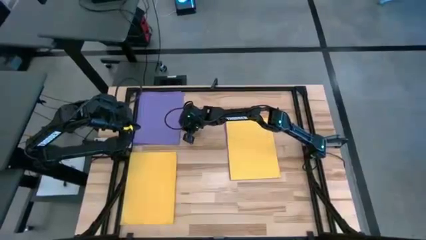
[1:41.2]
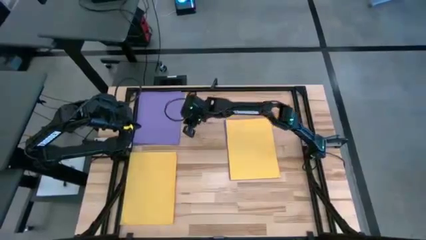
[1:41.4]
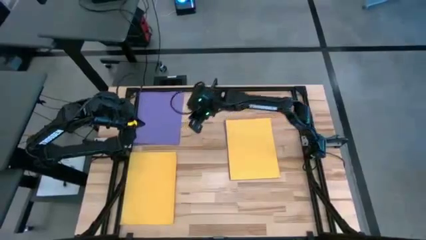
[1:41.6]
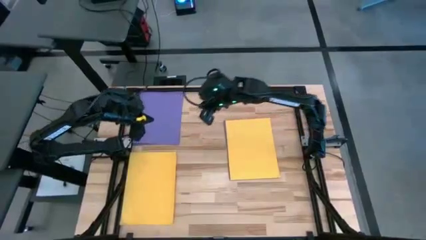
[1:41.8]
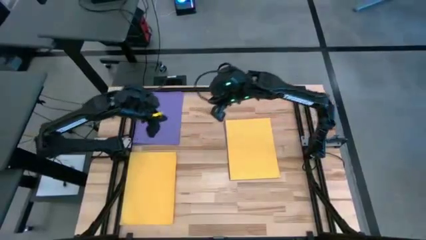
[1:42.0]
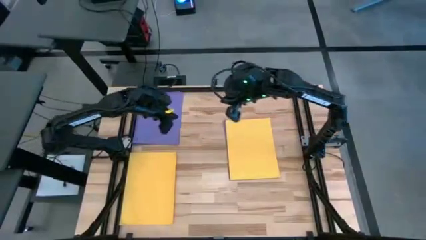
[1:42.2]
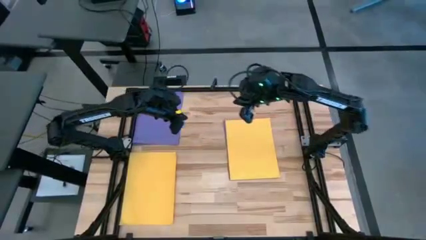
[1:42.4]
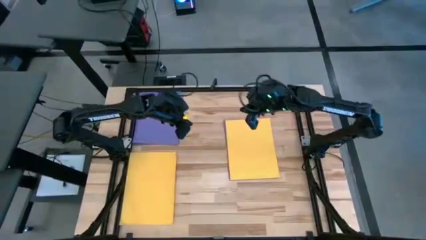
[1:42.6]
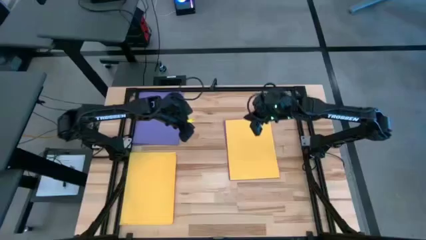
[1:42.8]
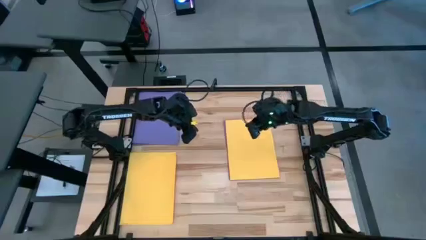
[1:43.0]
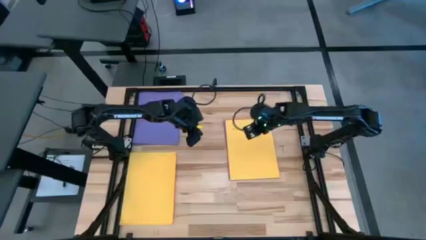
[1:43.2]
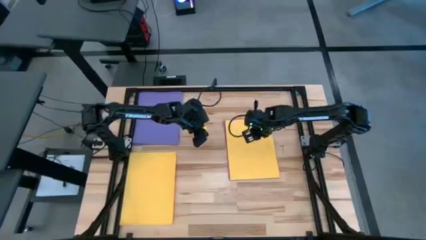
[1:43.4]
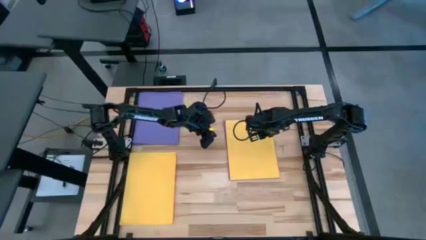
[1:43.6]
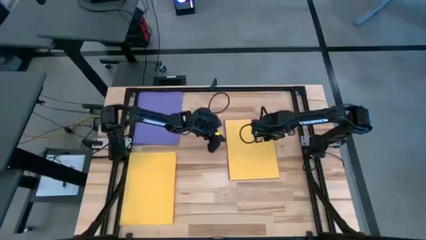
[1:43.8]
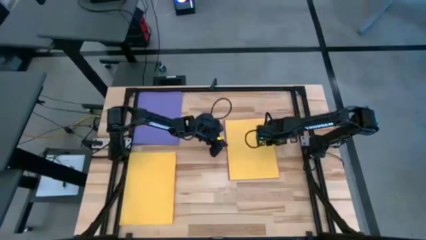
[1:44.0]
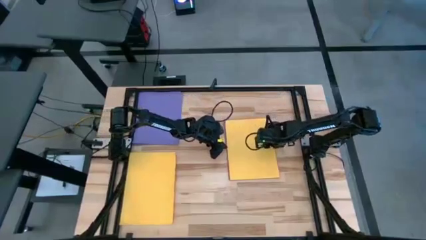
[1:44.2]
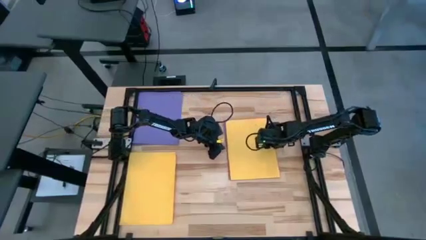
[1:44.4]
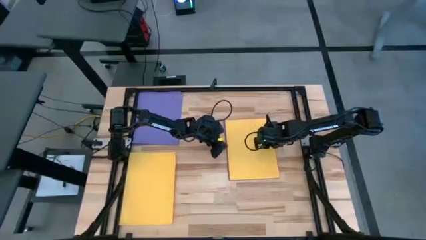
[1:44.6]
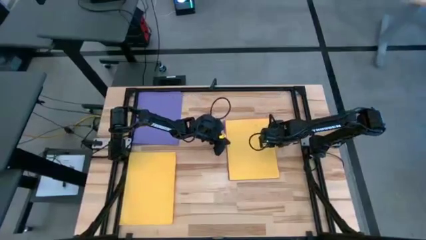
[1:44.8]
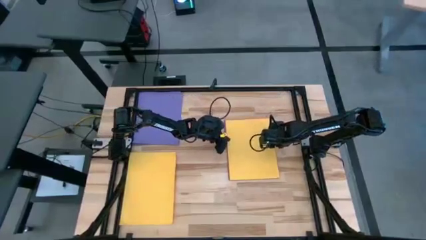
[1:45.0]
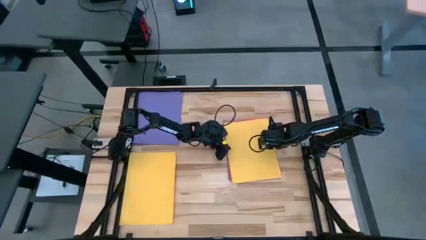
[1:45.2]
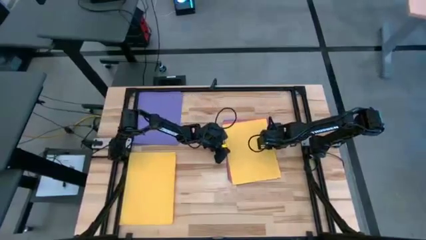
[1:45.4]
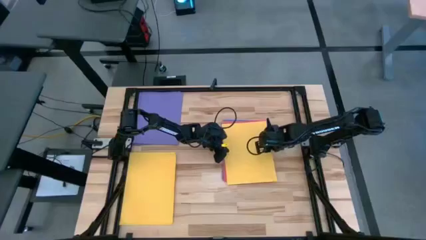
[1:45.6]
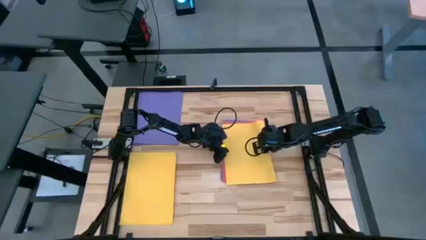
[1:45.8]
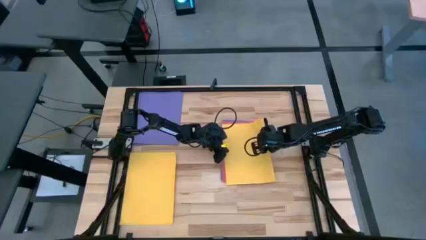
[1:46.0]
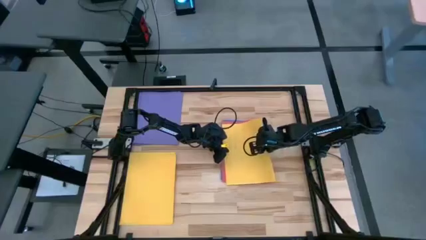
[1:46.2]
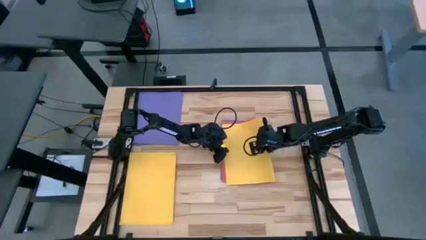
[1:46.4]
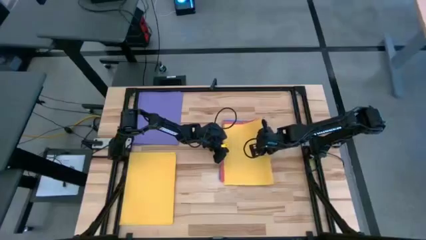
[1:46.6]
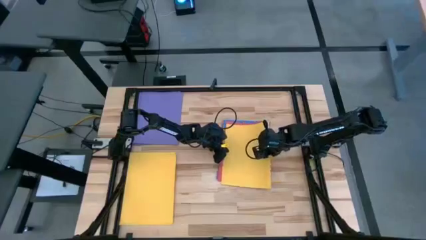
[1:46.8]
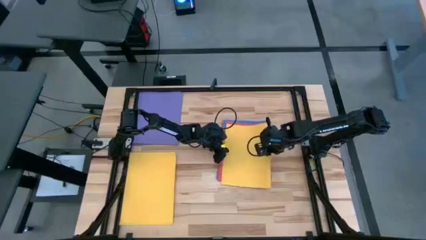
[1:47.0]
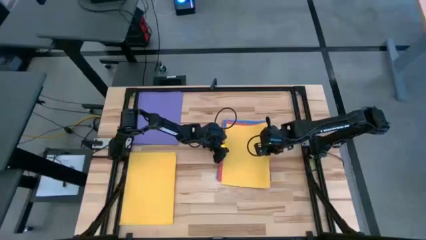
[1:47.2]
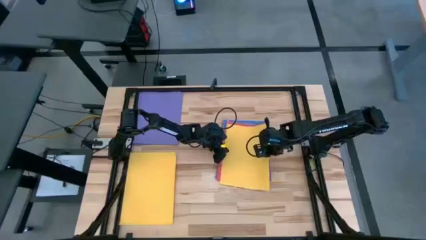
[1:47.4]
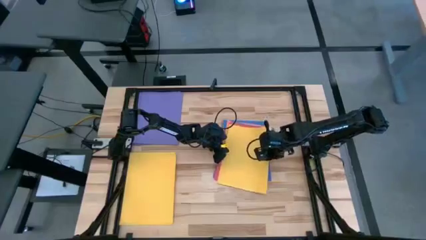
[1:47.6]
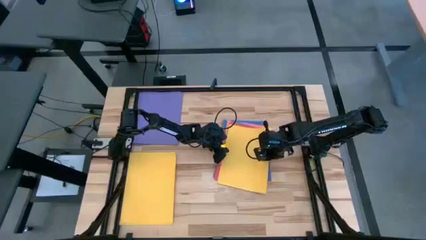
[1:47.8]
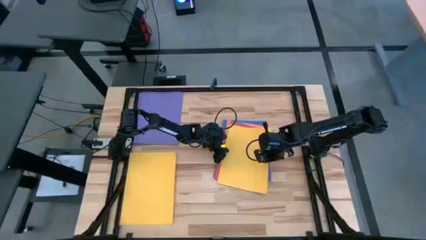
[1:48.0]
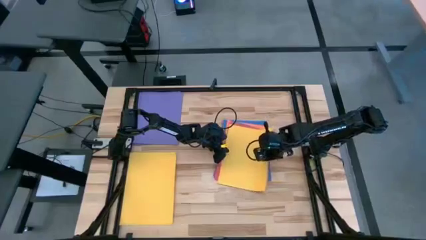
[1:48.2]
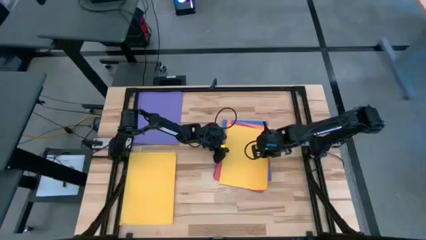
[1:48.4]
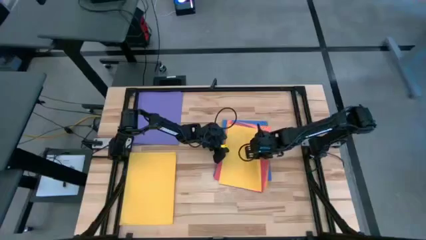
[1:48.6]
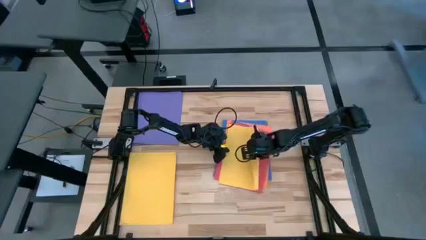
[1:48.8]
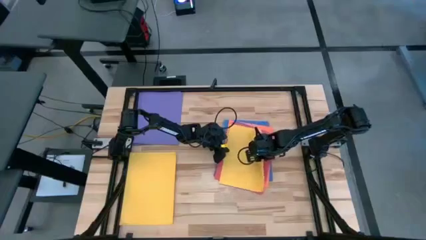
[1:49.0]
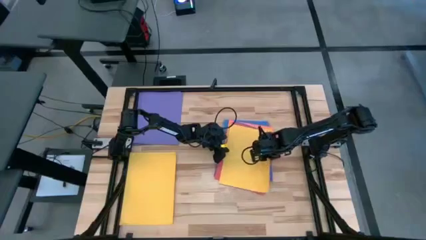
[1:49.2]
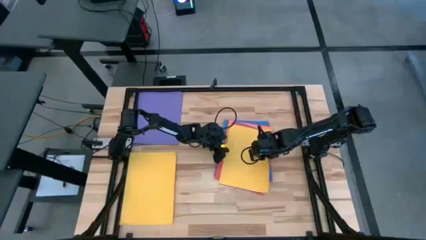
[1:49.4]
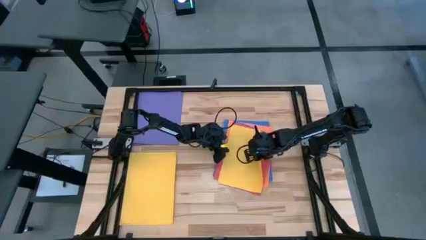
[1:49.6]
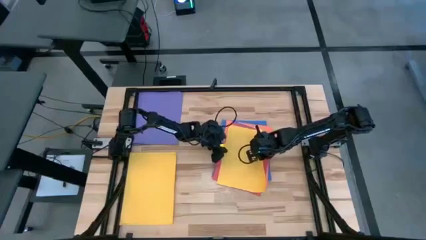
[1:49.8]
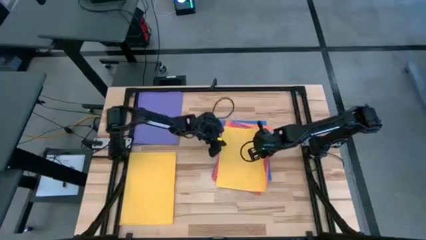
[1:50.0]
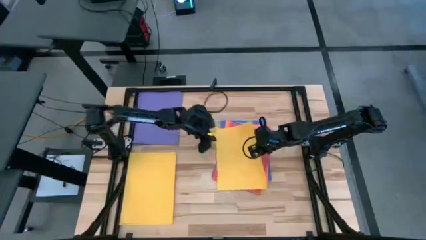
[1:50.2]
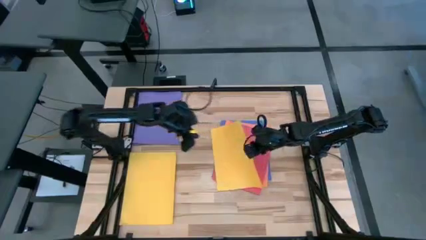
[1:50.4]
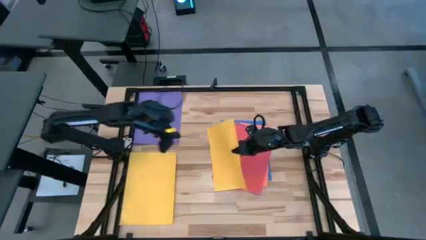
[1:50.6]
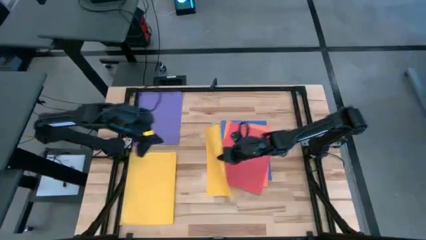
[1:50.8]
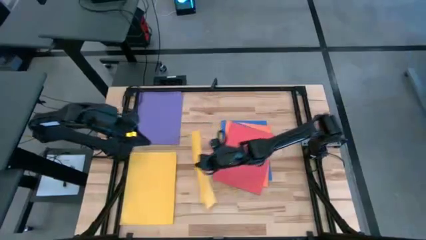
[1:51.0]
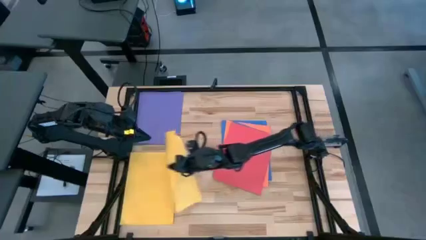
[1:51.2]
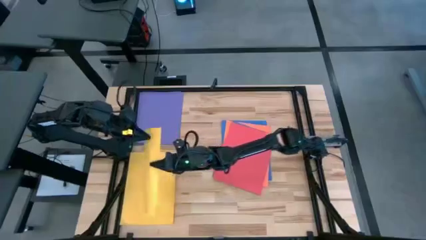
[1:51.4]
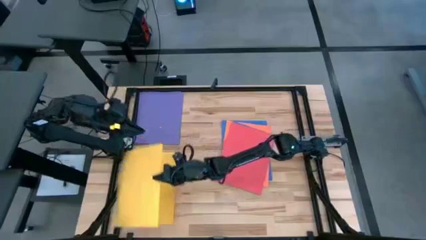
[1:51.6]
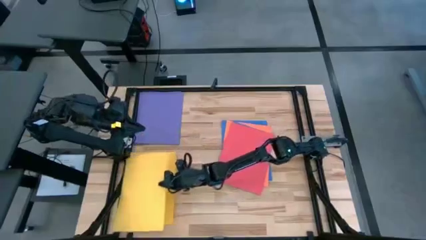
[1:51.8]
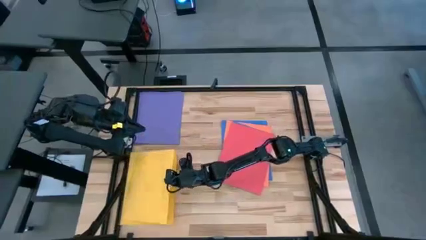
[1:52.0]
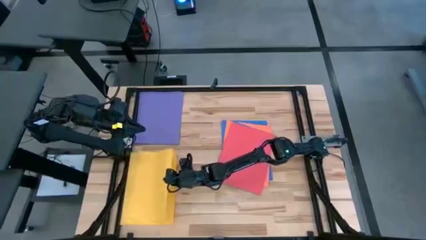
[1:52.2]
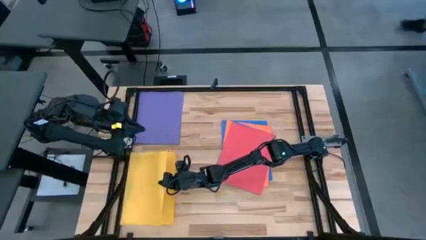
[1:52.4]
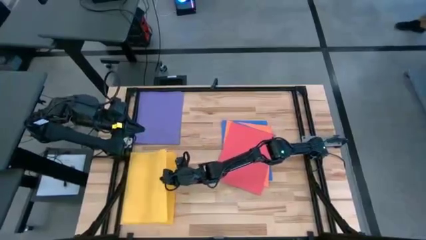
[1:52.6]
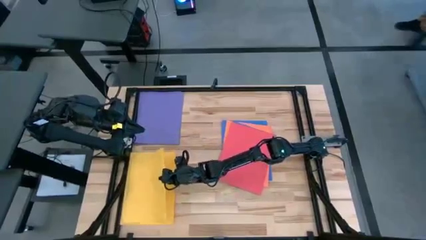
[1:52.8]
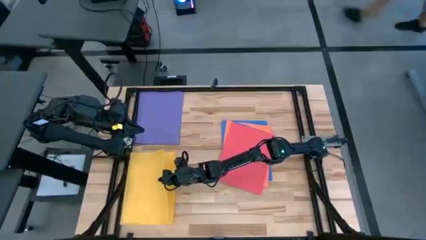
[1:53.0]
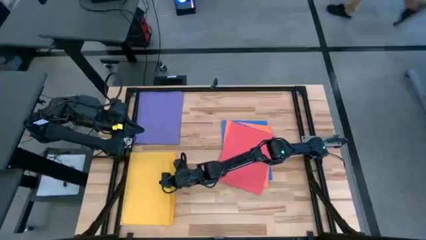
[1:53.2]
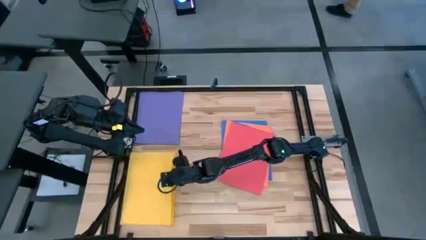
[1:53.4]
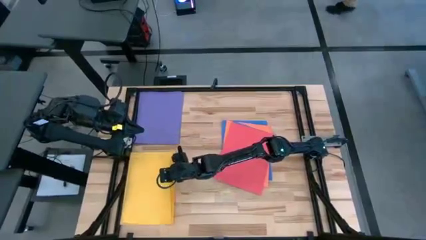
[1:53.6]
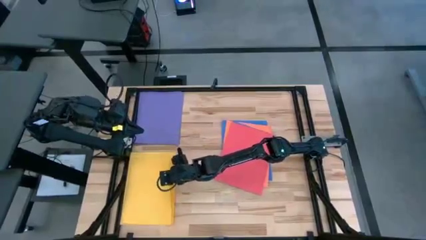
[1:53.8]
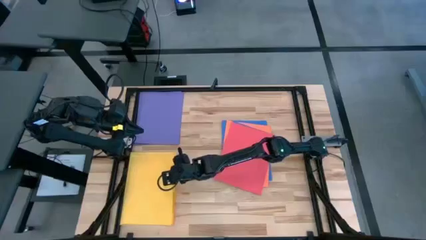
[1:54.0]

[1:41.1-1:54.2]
Task: Organize paper
Stack the yellow paper on top of the other yellow paper

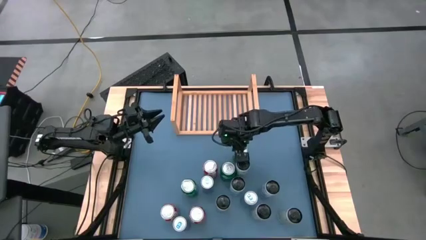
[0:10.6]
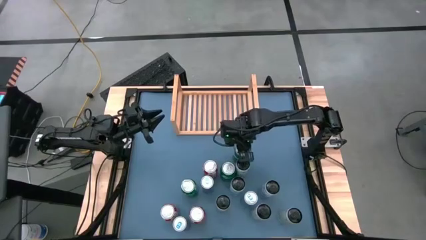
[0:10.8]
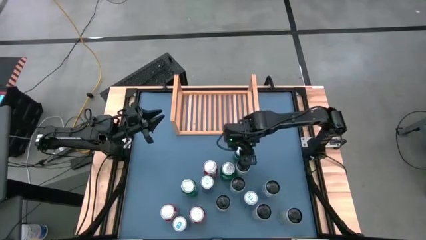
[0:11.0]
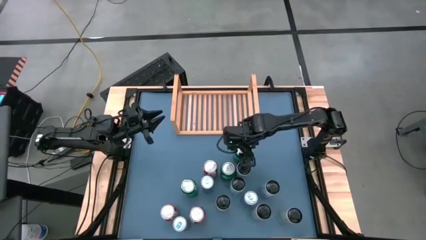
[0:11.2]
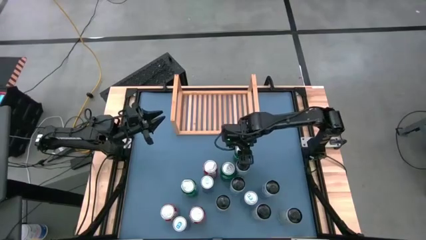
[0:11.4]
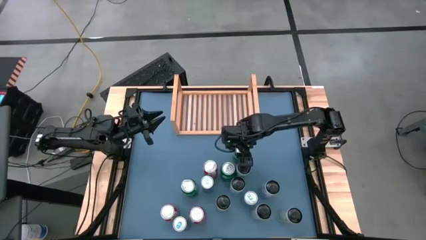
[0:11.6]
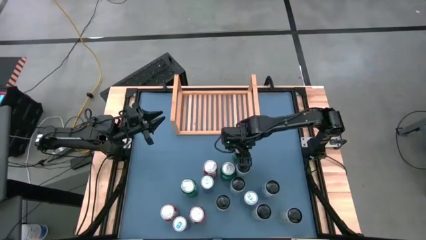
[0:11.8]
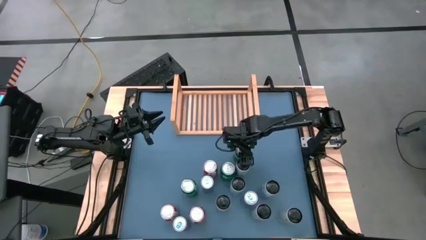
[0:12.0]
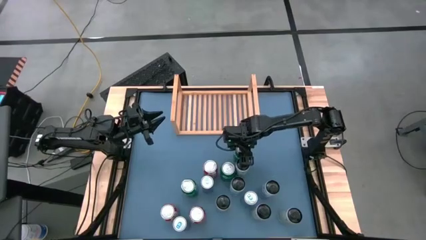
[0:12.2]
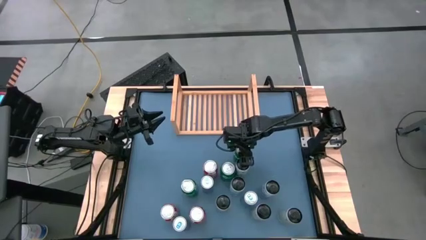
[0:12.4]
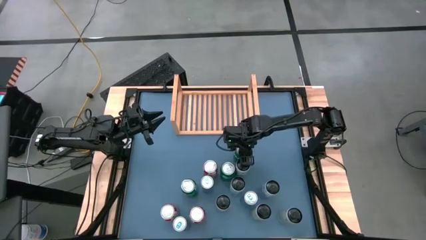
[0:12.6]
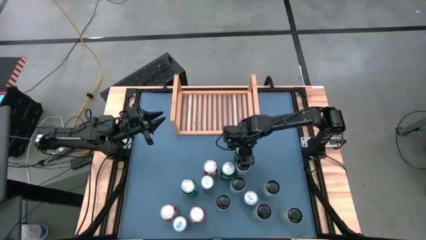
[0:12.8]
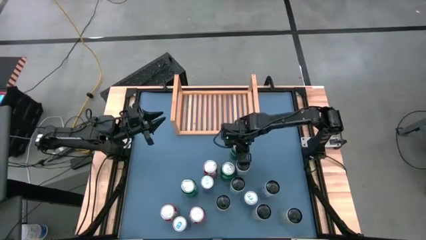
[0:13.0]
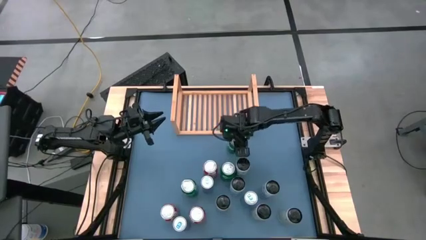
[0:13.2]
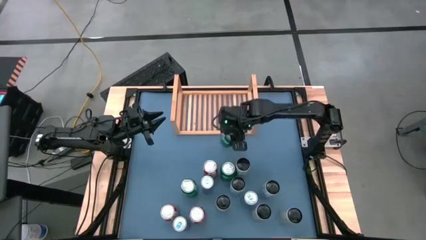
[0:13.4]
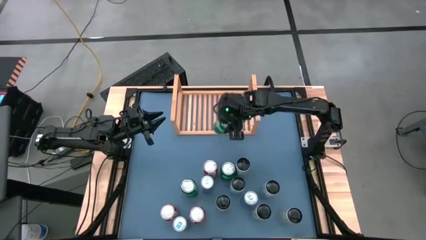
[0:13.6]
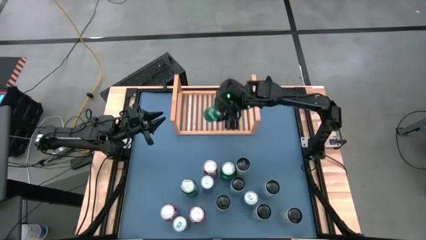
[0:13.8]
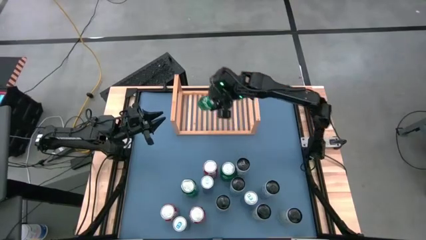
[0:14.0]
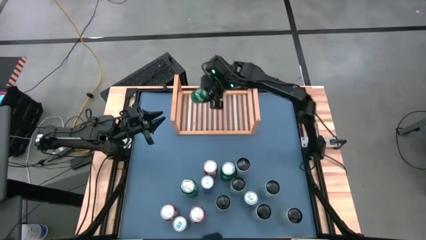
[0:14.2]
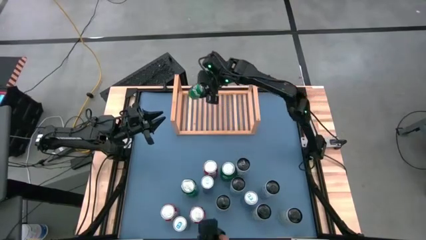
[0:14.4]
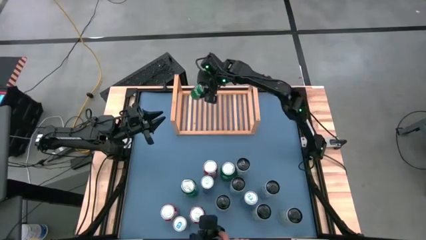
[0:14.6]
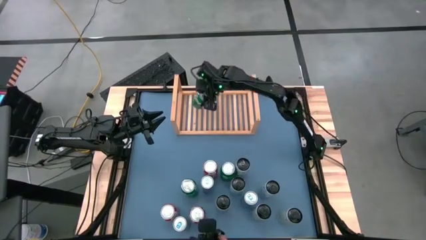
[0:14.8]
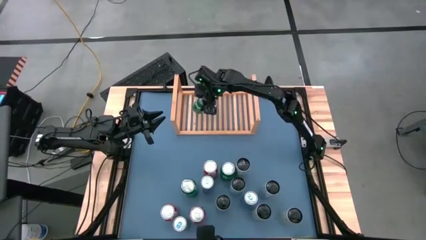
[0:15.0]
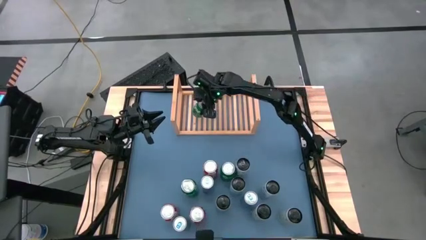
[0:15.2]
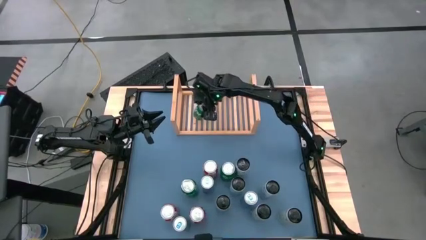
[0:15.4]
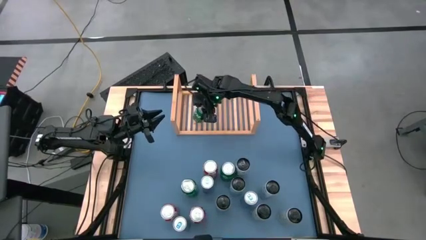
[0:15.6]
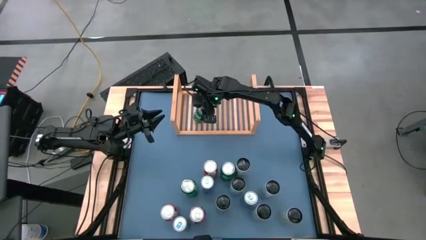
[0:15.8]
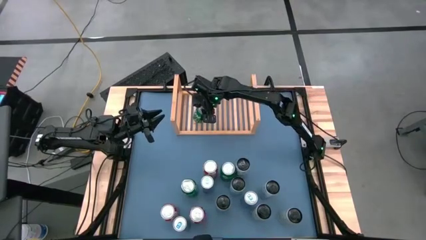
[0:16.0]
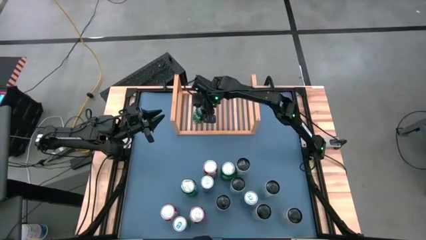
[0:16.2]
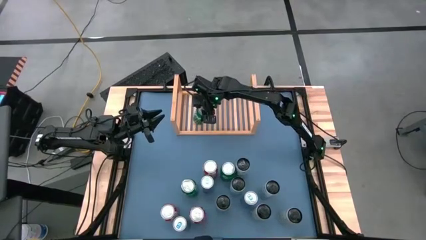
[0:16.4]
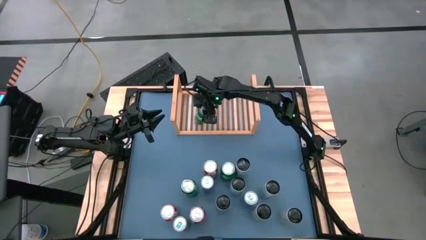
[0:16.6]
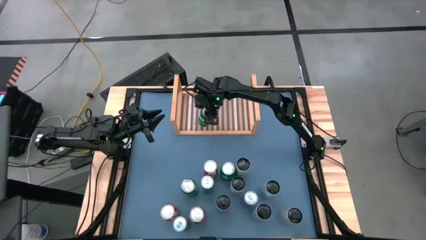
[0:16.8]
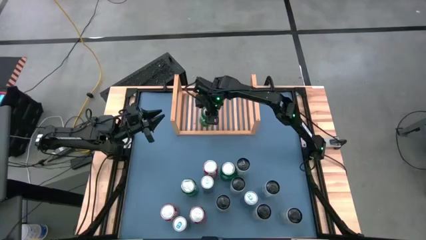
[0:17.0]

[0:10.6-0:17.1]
Task: Place canned beverage on shelf
Put the top right green soda can aligned with the green soda on the shelf
